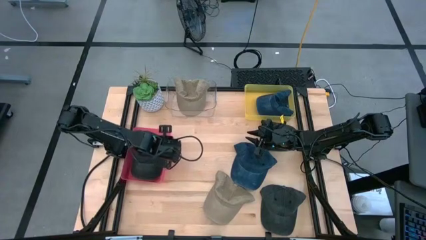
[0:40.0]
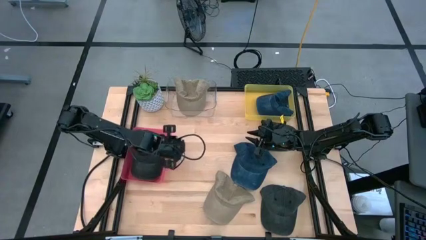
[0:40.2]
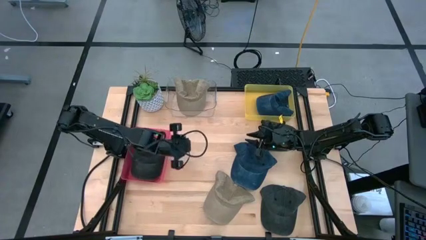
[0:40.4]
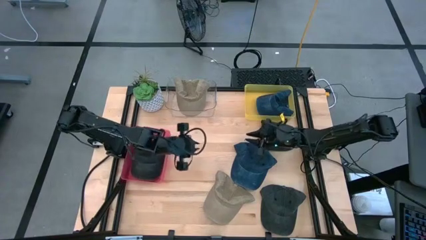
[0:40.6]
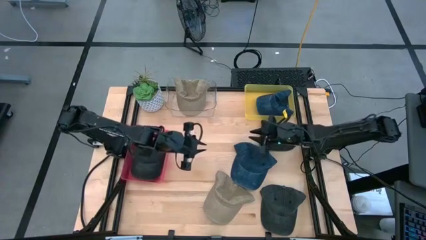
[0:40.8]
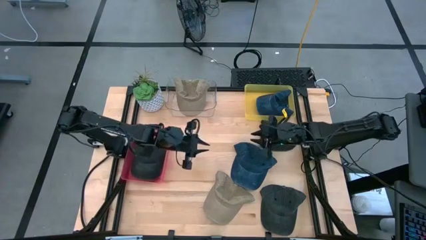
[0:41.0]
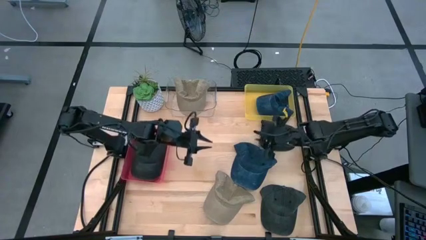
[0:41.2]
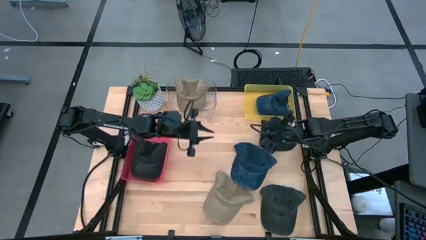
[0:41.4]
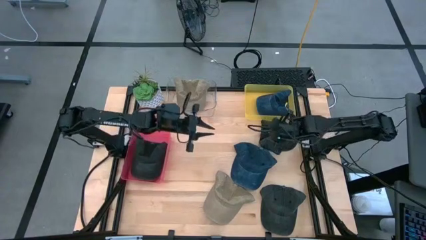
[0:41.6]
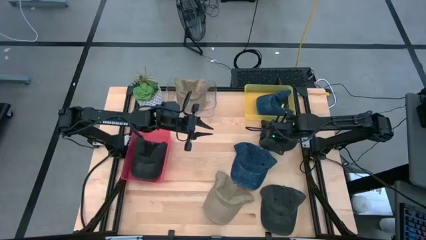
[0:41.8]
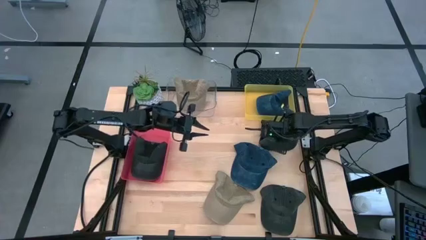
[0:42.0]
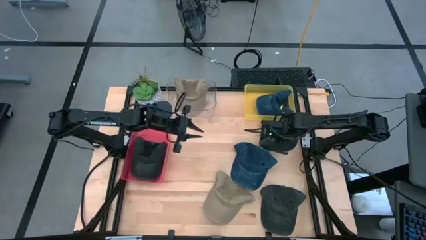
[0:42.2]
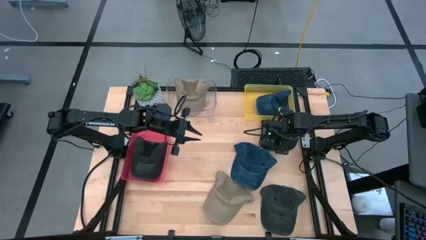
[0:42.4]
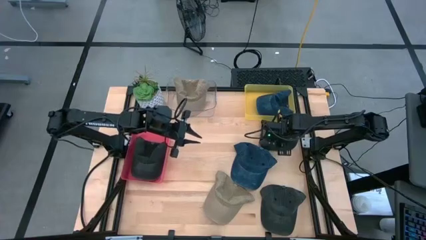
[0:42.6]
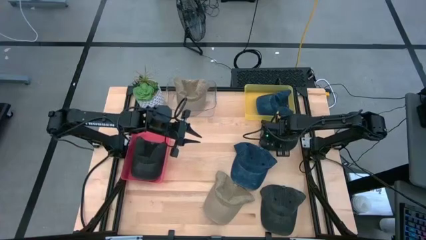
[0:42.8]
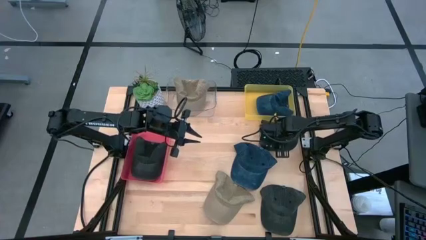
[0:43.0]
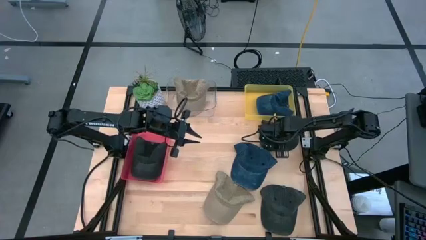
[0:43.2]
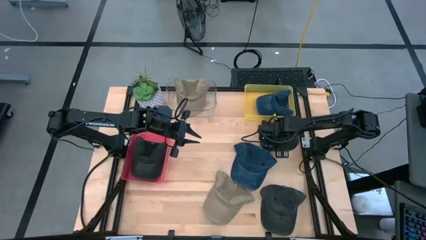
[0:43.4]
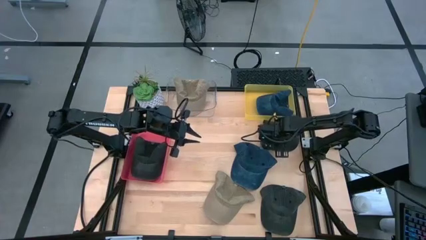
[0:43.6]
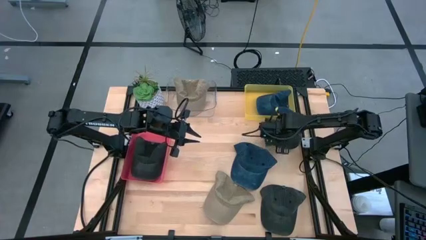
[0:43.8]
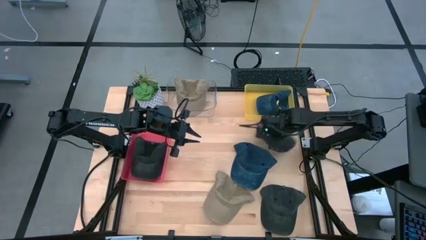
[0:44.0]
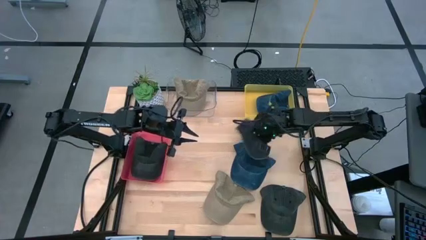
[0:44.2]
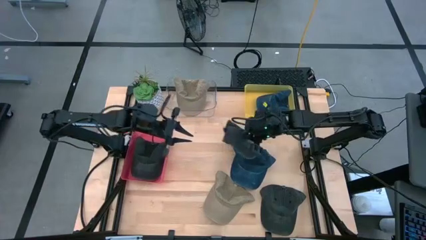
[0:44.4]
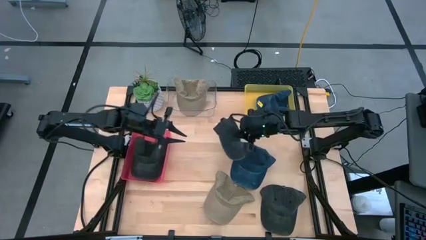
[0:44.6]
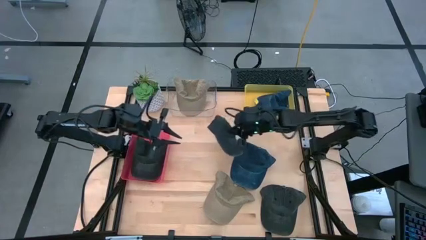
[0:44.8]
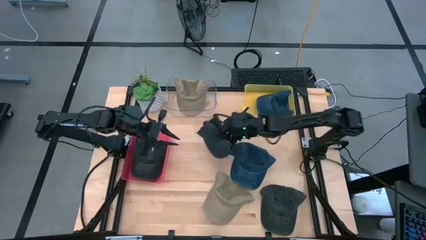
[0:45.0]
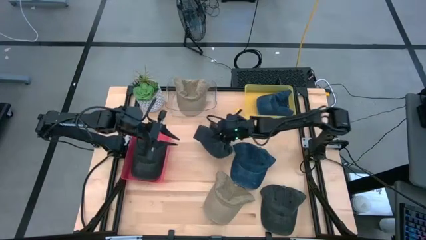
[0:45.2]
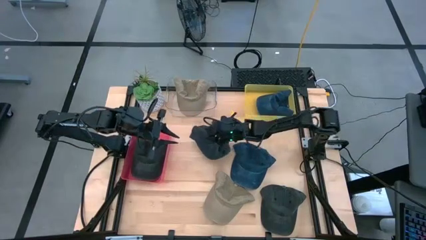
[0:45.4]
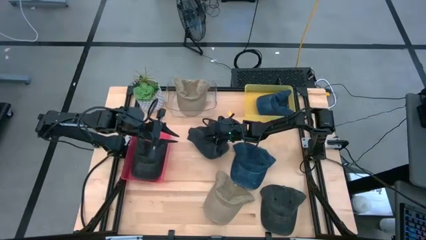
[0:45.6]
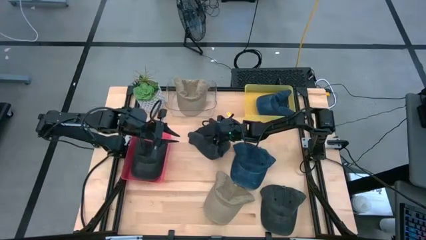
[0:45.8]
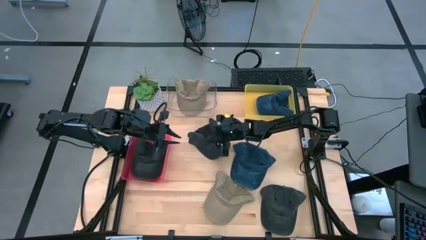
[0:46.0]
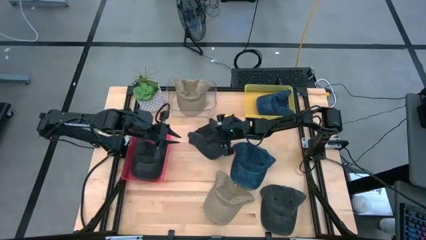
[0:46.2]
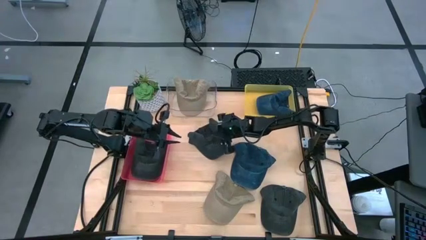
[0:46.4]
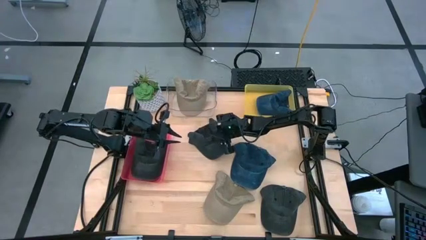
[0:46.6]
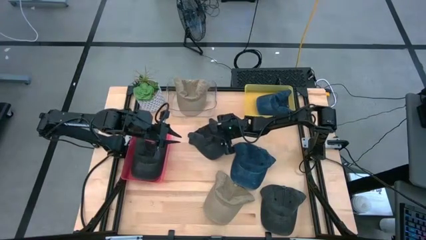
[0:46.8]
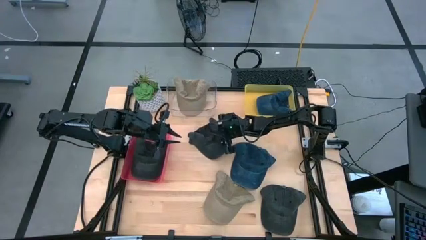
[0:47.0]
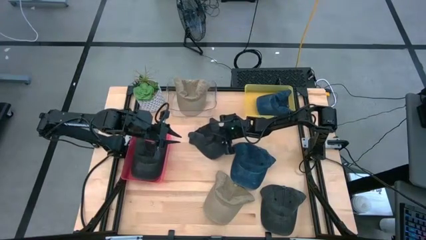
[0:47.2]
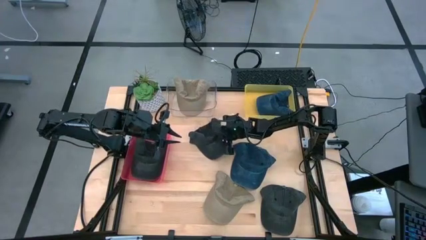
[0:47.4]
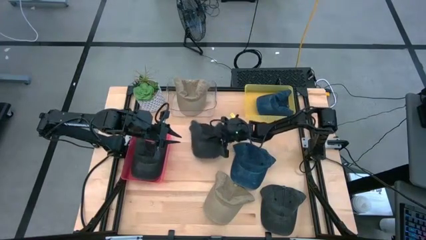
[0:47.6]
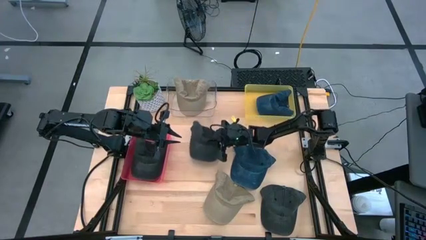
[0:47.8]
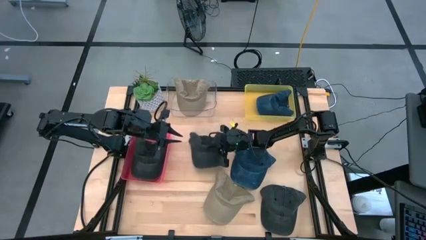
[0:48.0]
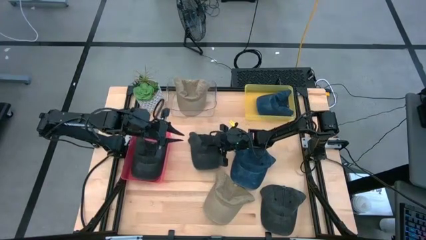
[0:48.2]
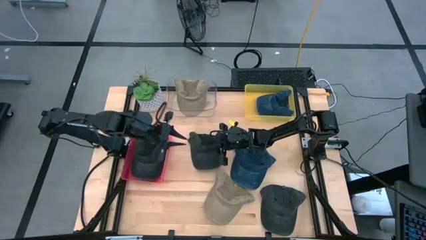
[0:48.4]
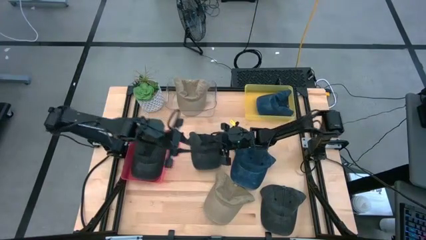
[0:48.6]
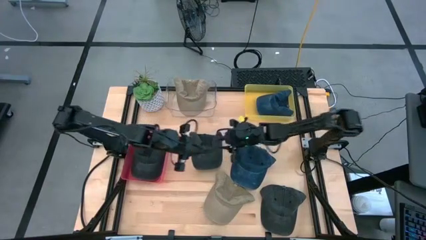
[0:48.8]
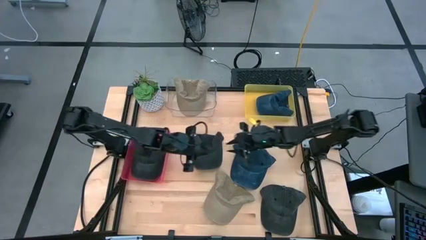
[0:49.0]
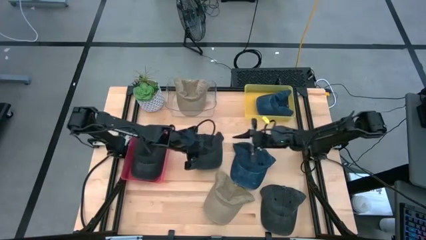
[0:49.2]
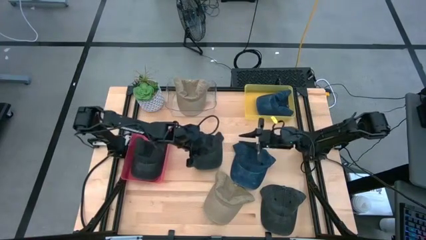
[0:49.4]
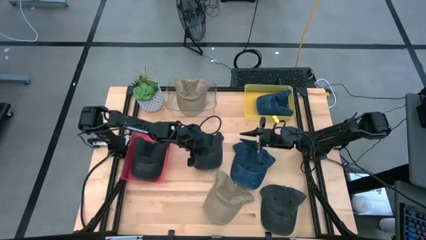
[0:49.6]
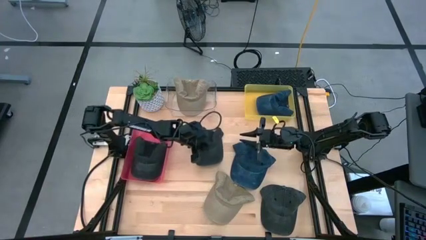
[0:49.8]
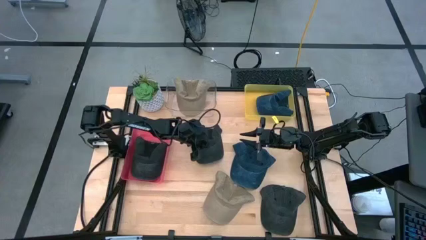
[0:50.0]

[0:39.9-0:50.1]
Task: Pick & Place hat
Put the top black cap into the red bin

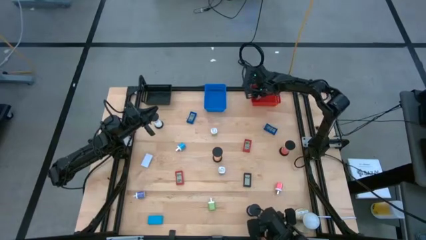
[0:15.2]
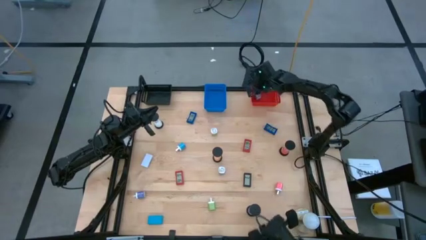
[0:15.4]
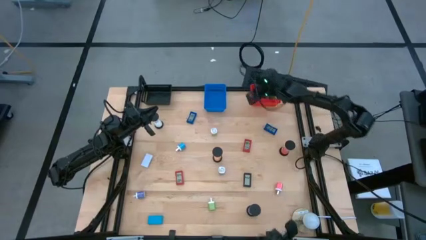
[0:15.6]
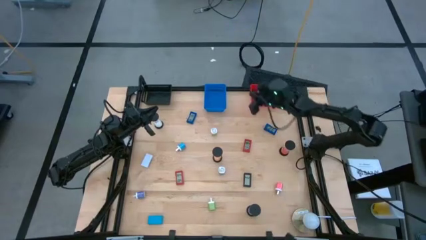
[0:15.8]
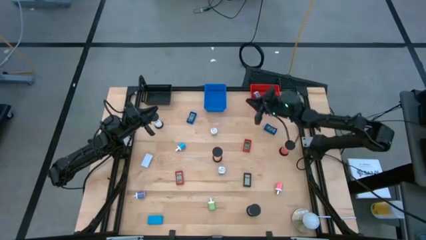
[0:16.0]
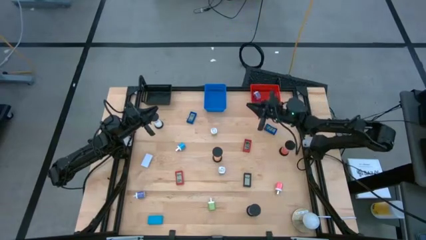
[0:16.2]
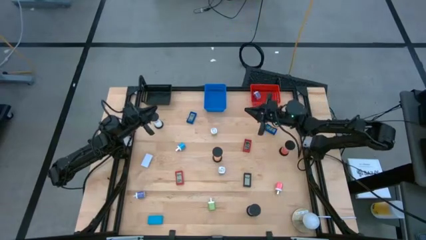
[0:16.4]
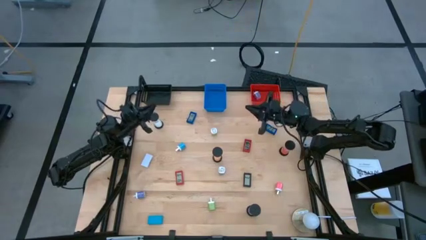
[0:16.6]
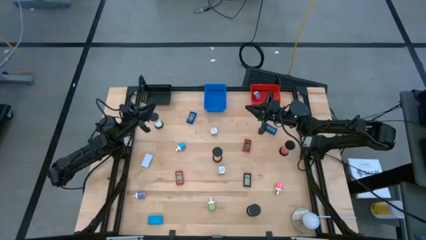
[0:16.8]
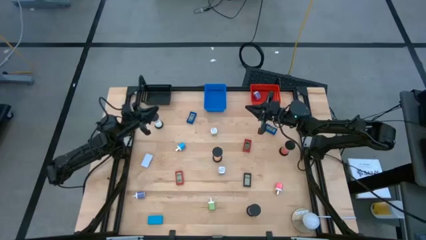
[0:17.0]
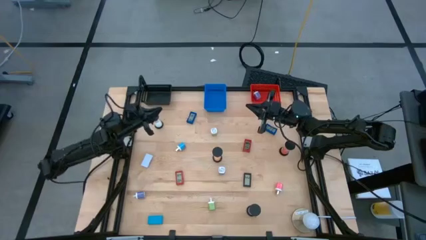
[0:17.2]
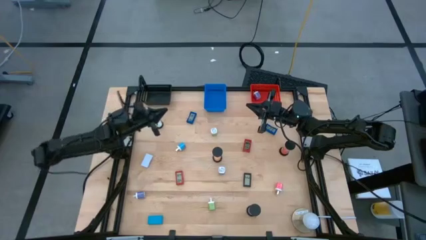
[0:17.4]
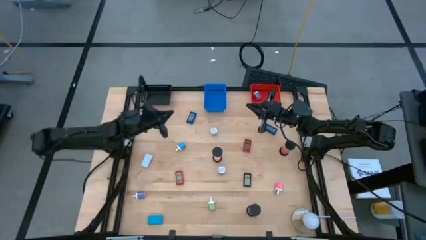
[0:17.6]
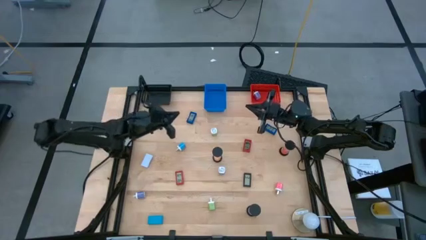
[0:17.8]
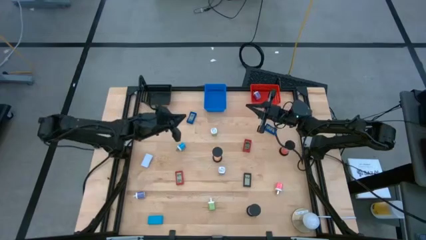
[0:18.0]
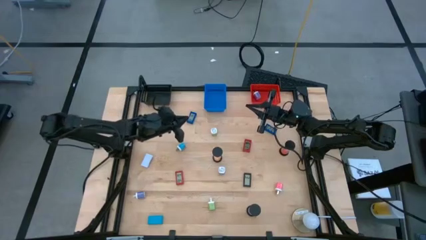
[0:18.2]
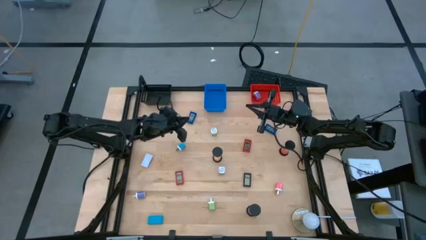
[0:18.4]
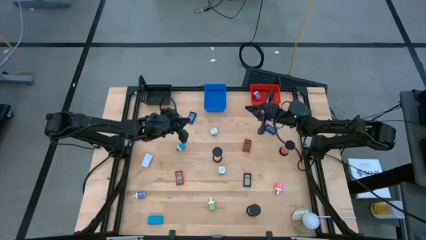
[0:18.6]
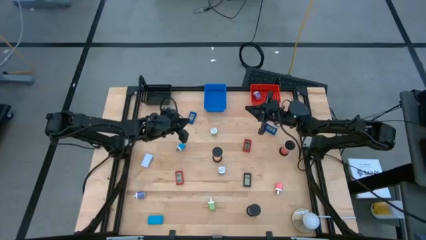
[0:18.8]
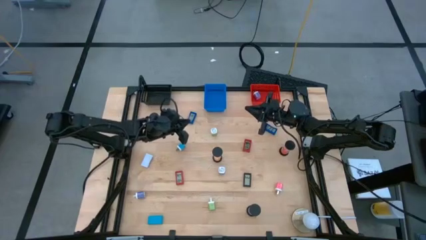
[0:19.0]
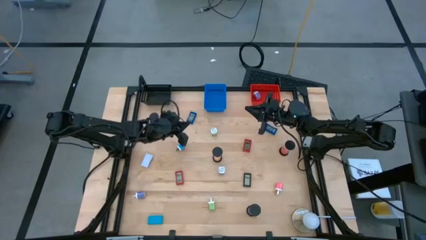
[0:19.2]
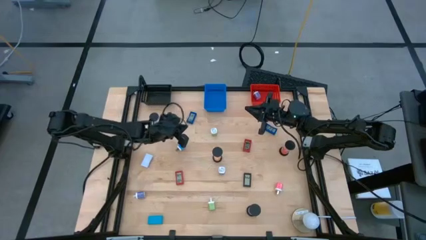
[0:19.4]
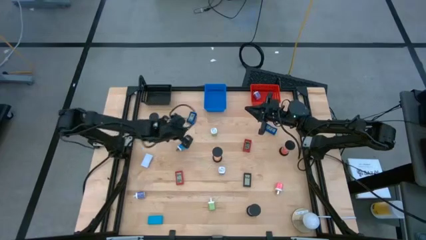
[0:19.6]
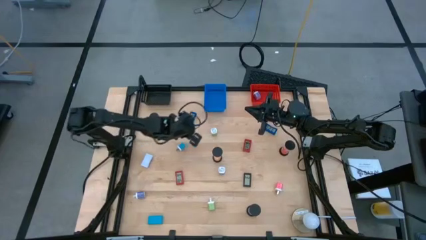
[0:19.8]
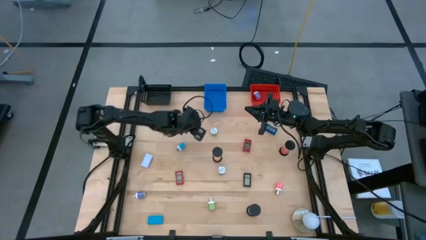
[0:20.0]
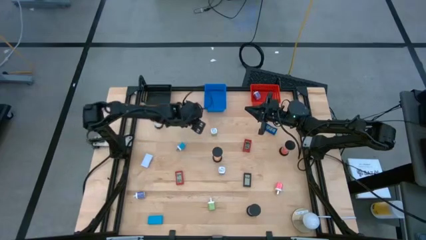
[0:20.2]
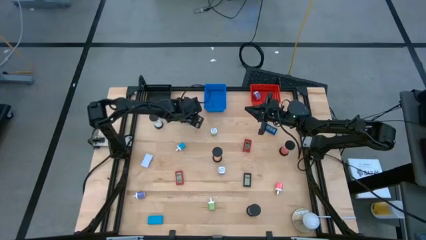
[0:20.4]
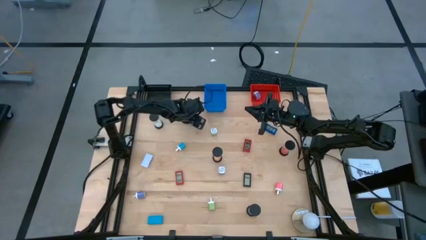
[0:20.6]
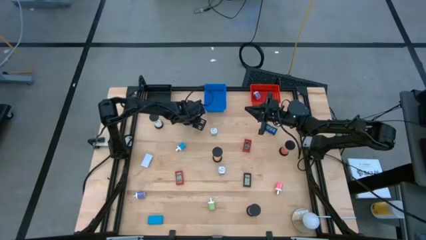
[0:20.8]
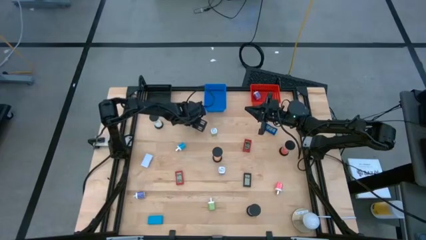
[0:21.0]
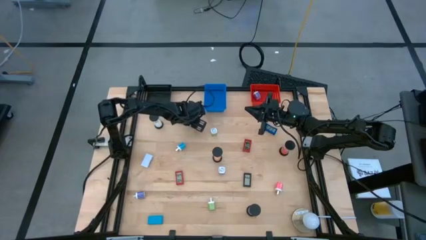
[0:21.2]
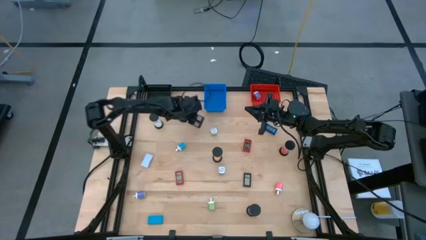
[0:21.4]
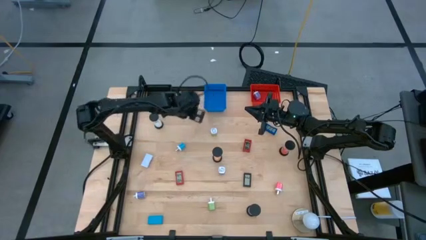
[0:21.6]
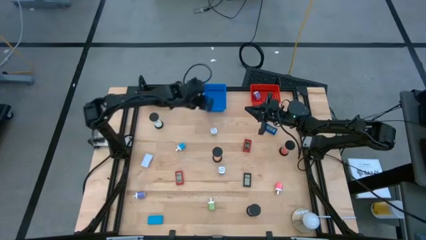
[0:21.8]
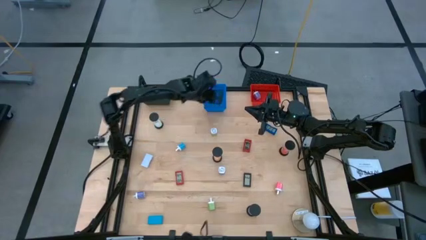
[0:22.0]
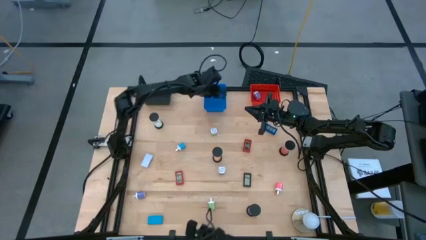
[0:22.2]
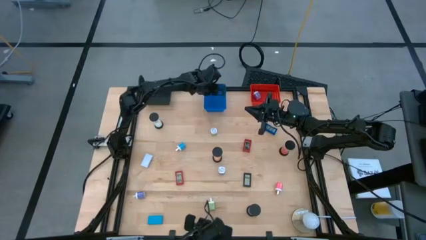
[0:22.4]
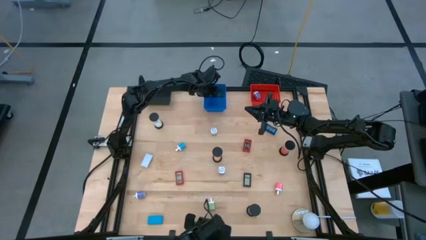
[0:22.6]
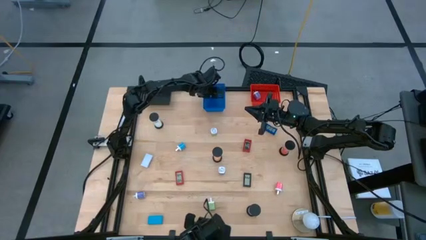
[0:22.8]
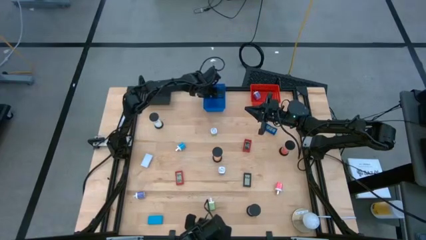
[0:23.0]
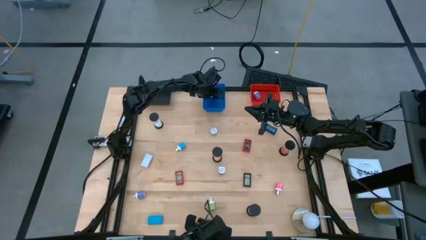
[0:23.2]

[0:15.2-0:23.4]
Task: Pick & Place Office items
Put the left dark blue digital clock into the blue basket
